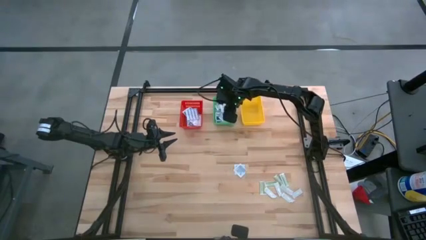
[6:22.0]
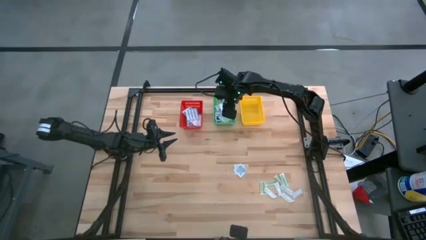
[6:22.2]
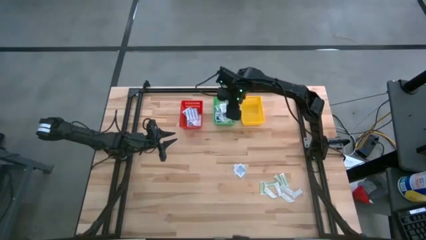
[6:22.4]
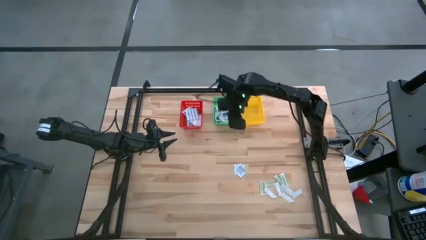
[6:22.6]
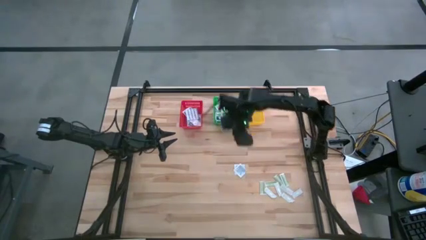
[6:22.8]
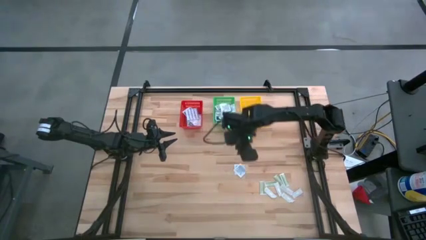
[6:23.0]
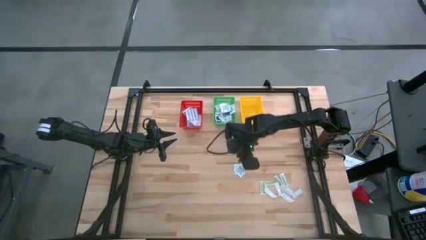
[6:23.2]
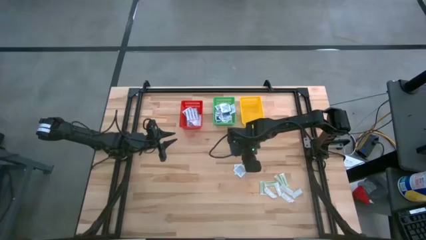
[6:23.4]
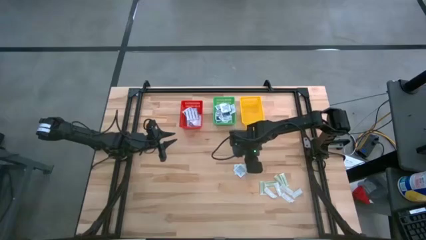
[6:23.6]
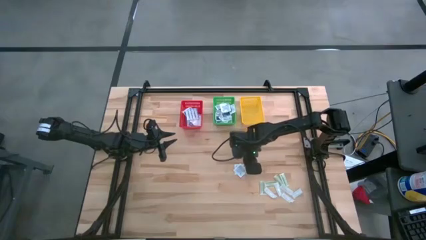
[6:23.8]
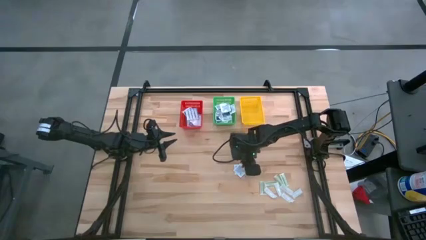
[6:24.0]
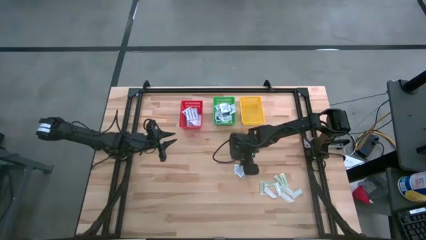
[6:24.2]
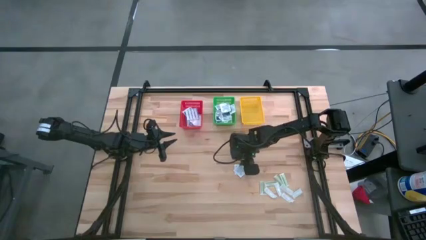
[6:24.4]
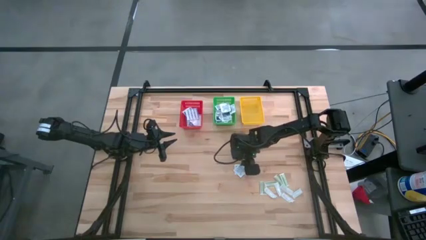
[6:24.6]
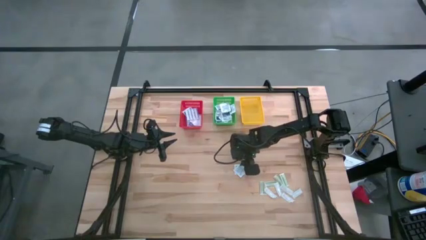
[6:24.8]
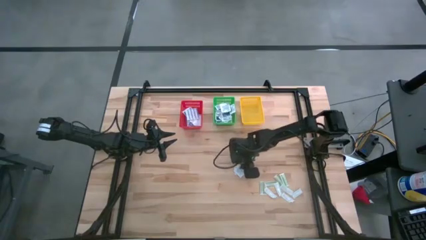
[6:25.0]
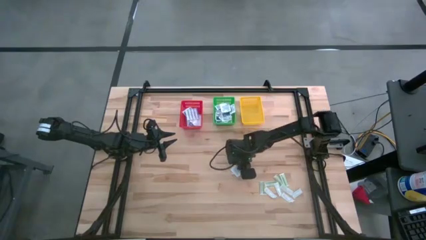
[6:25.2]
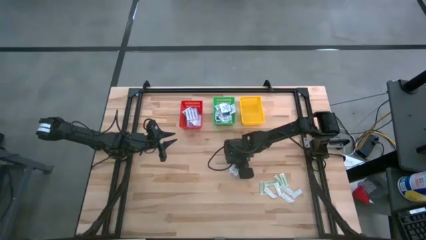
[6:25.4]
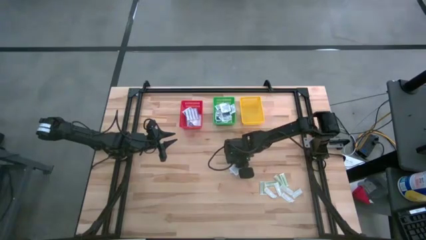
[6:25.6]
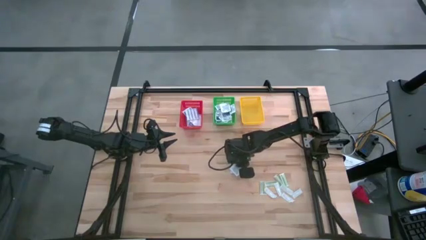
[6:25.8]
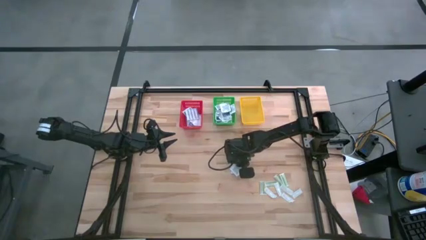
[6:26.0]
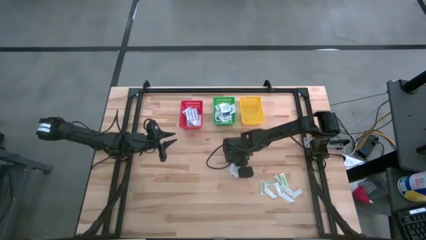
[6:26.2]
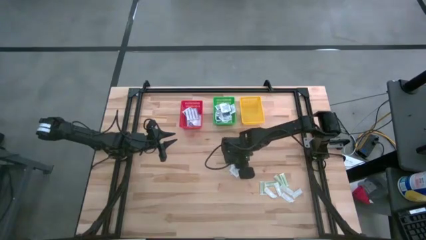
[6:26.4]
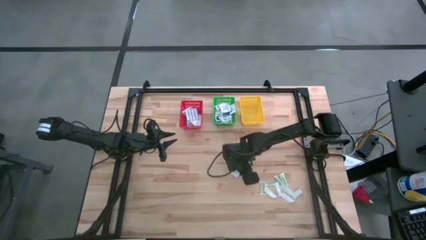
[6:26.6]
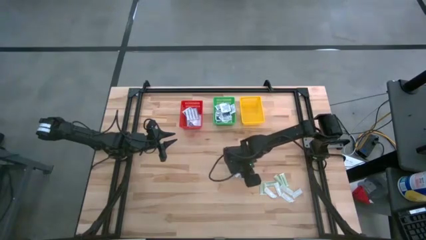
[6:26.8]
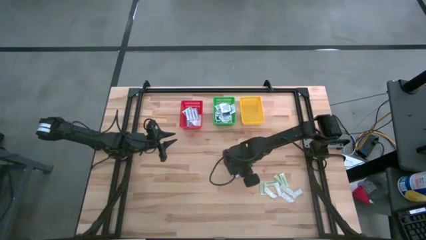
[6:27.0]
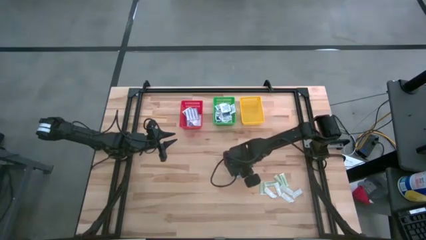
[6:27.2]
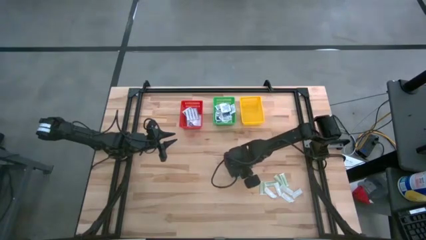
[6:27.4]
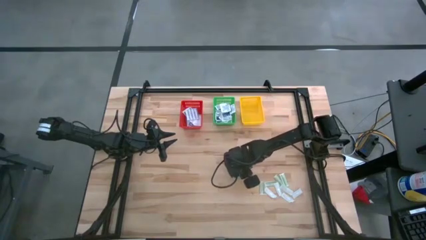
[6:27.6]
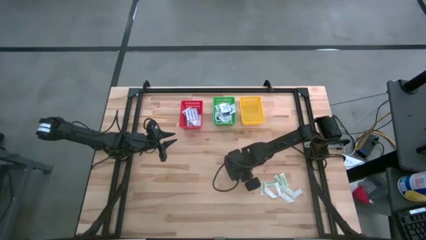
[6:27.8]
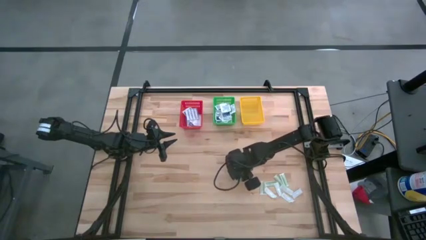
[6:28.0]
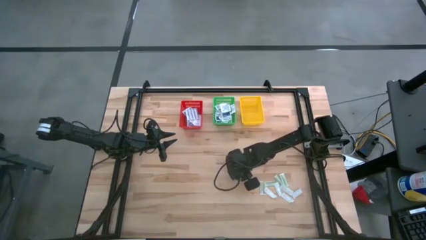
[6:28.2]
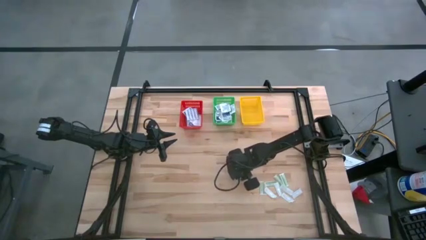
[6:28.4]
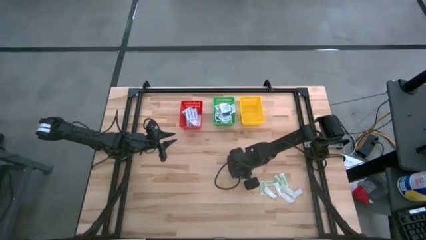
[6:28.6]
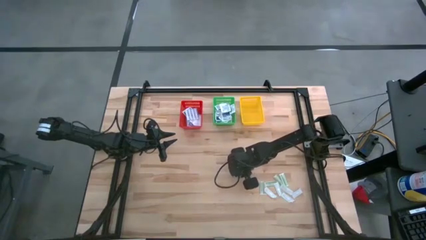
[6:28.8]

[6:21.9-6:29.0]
Task: Pick & Place First Aid Supplies
Put the alcohol pad into the green basket

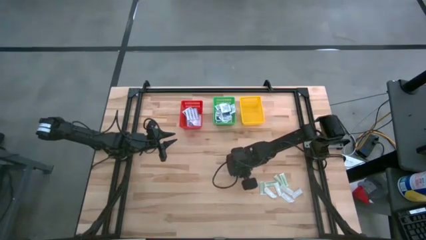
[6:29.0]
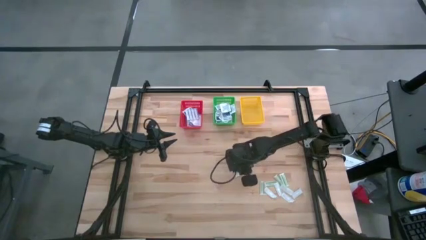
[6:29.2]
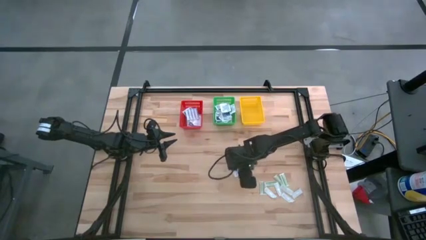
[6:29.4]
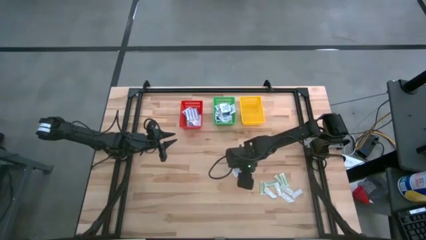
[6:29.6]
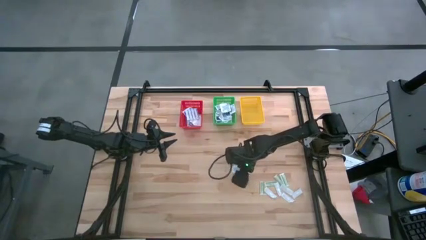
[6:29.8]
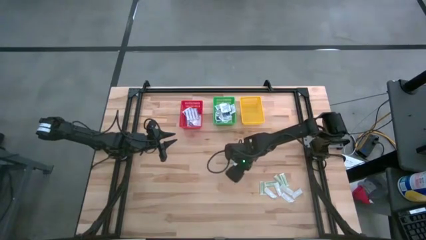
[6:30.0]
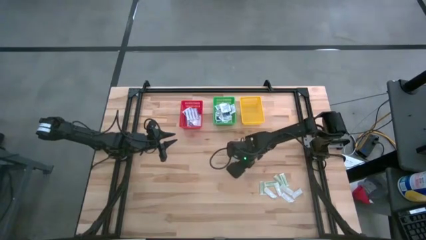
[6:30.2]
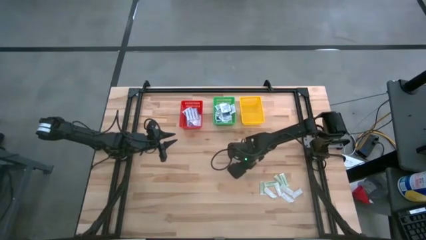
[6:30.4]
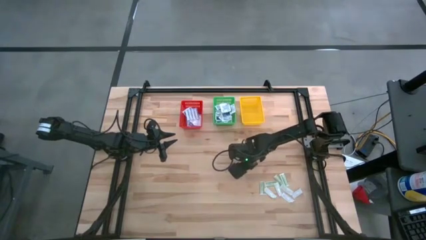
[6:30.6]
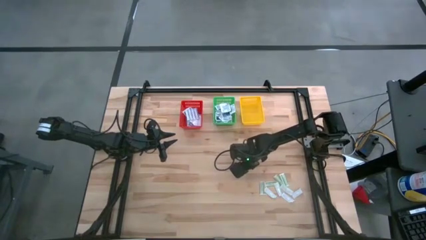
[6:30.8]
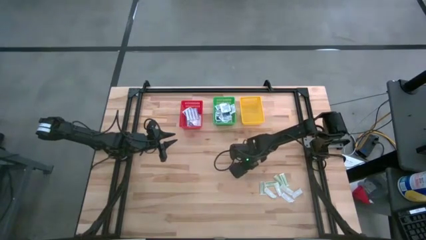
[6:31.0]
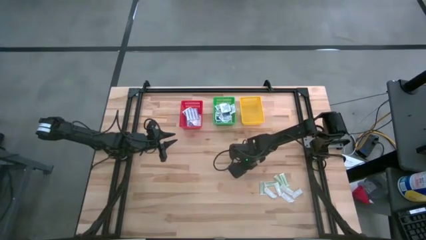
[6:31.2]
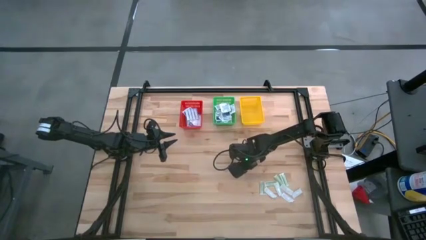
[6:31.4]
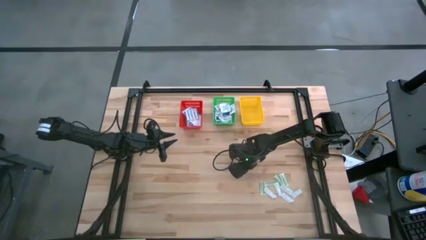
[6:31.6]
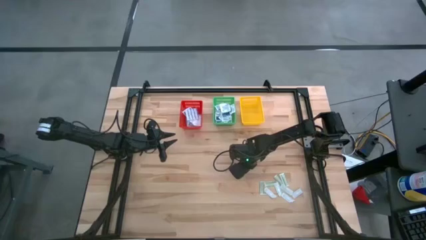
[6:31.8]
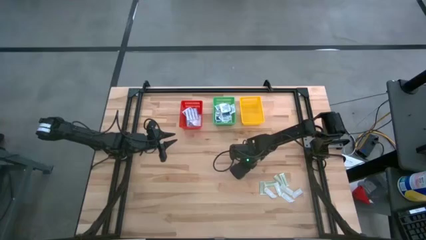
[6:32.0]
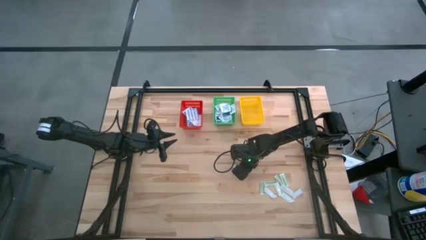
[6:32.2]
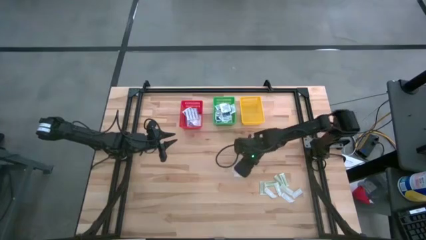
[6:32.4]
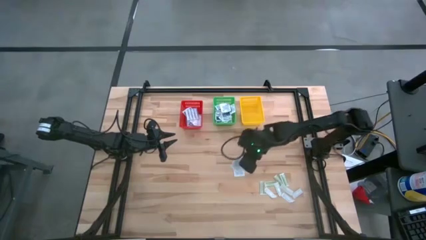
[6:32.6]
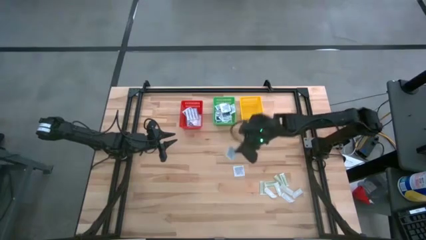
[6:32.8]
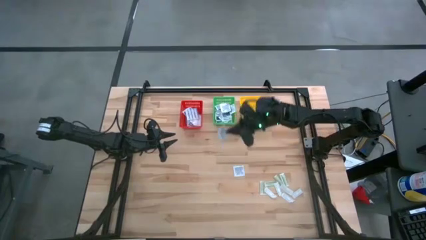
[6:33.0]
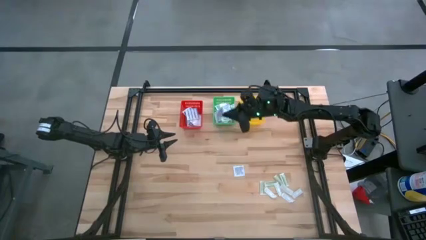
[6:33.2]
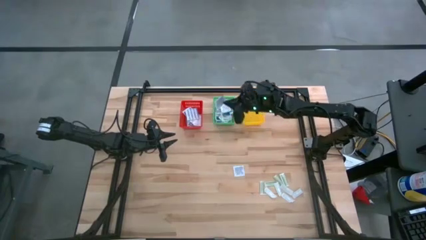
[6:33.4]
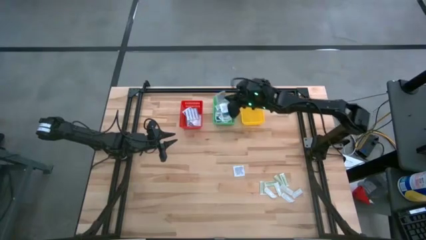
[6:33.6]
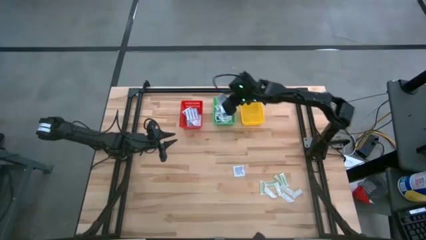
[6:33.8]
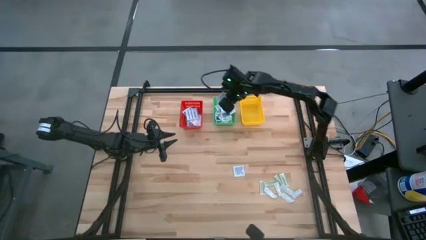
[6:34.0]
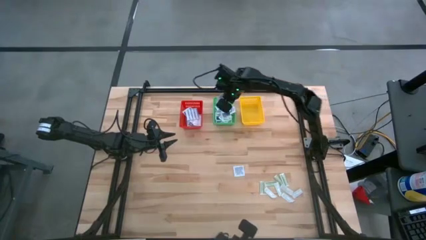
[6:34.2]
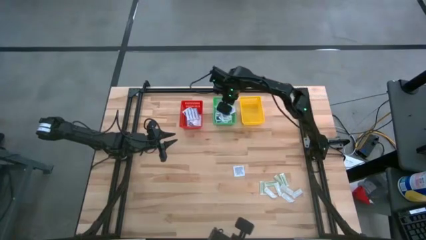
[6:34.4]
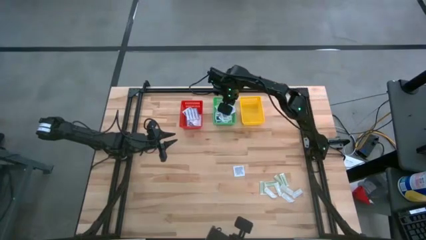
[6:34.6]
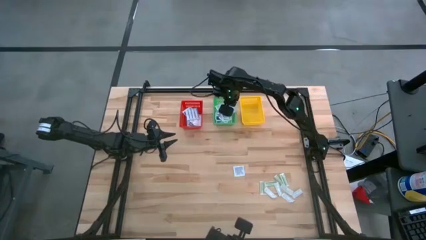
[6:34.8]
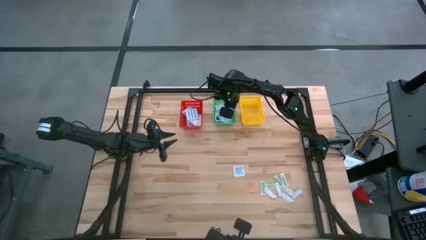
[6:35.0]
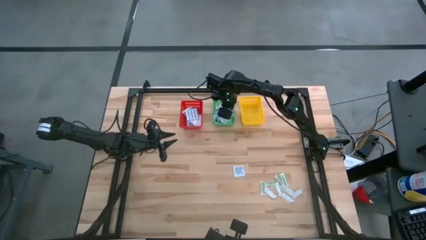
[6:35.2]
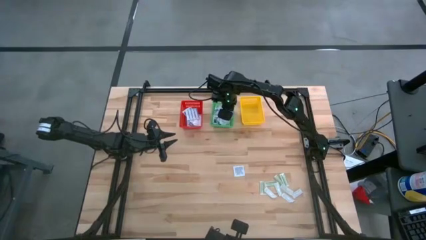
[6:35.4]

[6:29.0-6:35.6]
Put the alcohol pad into the green basket
